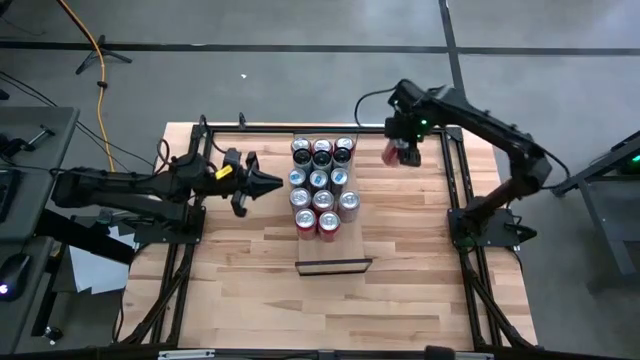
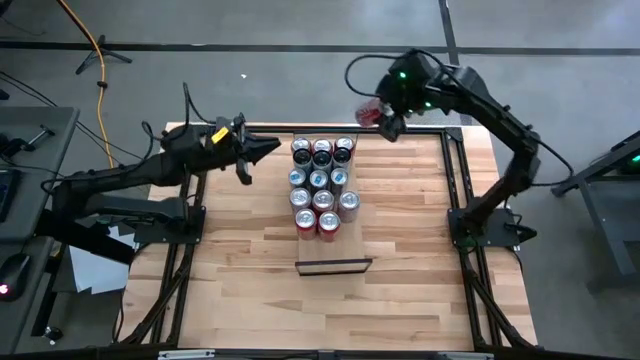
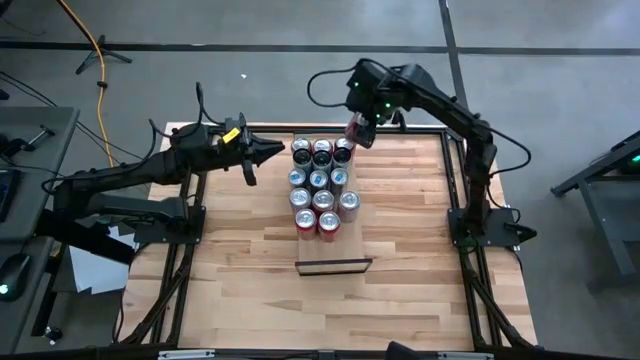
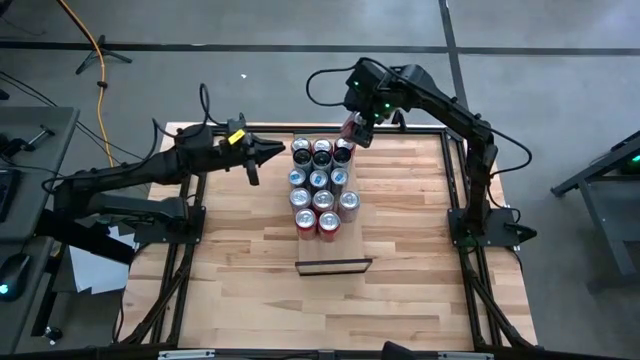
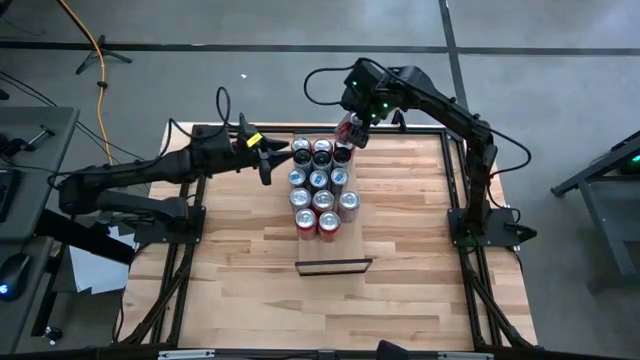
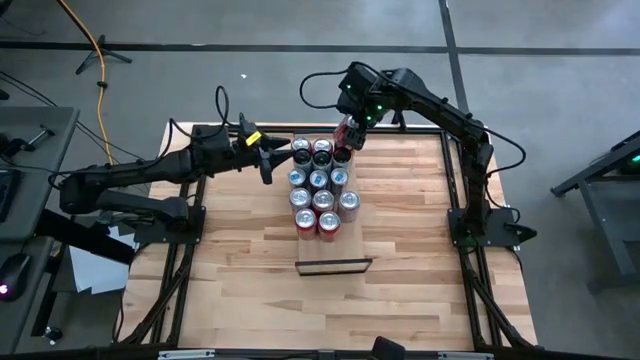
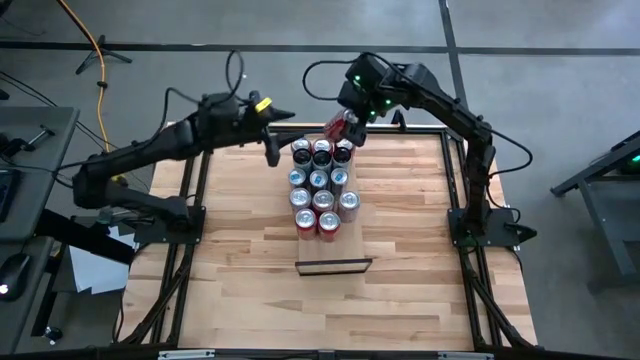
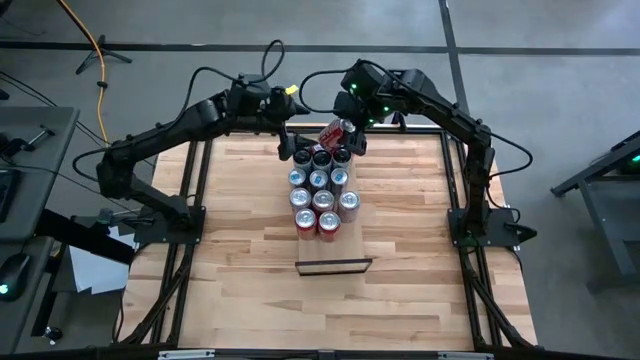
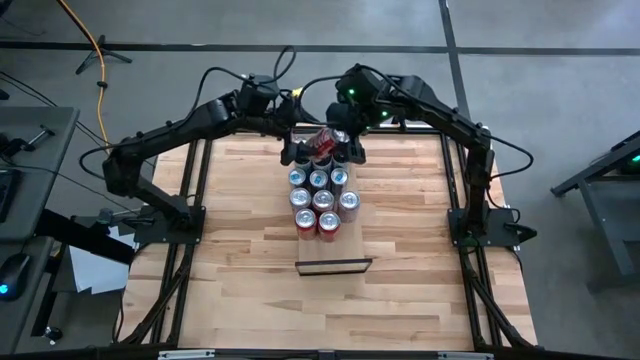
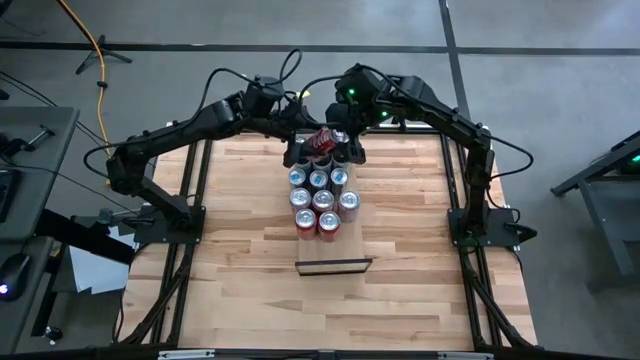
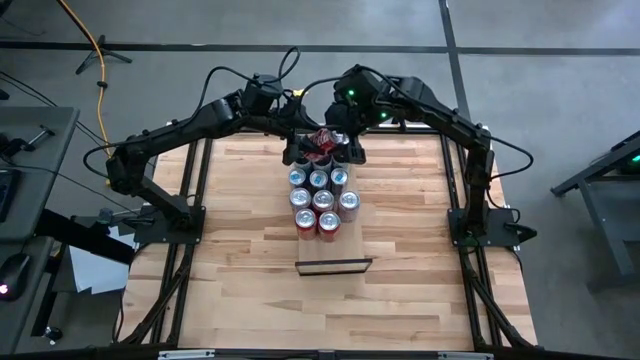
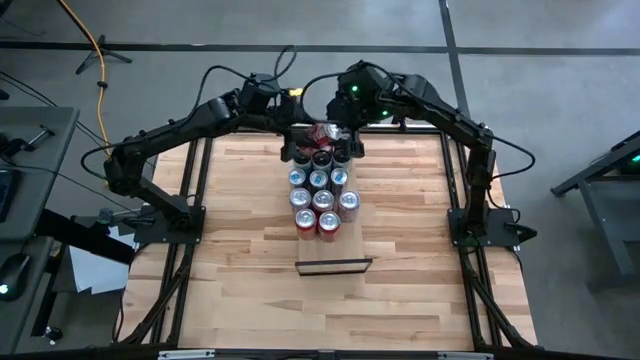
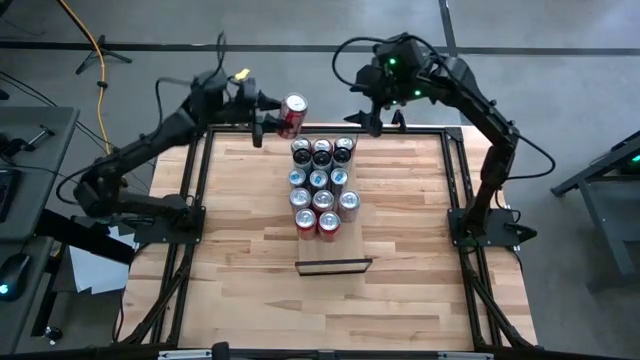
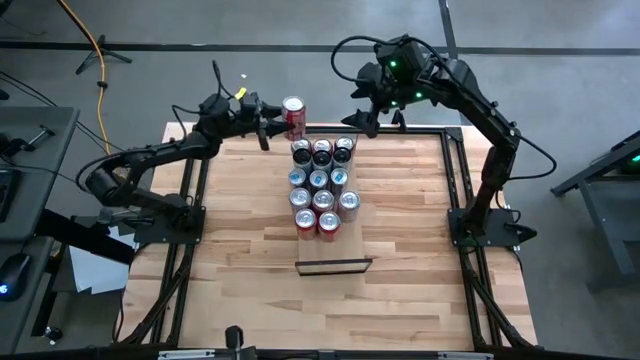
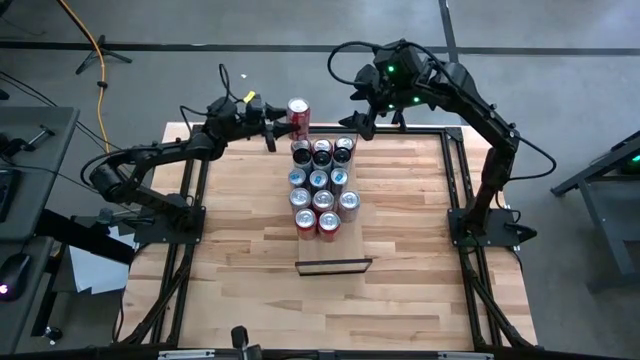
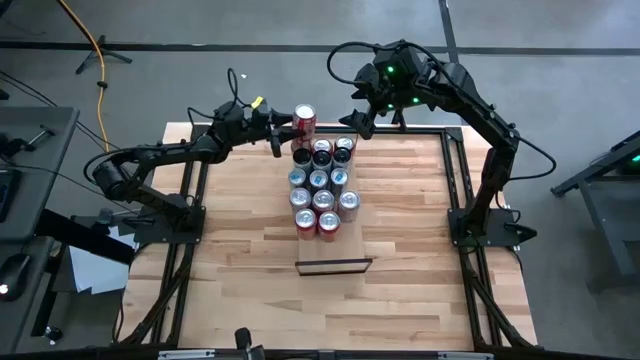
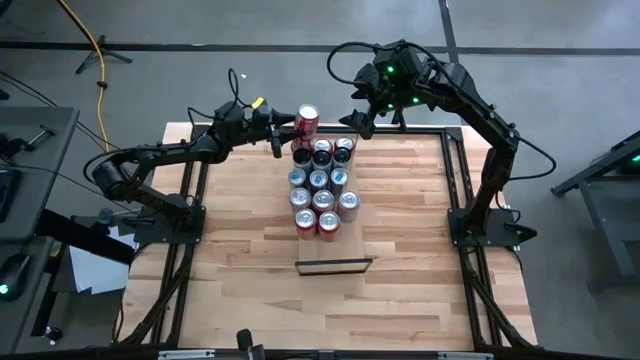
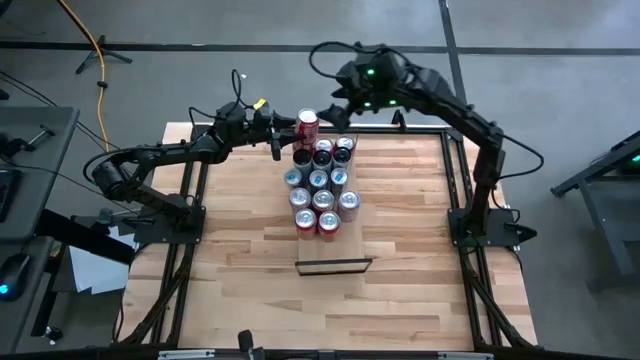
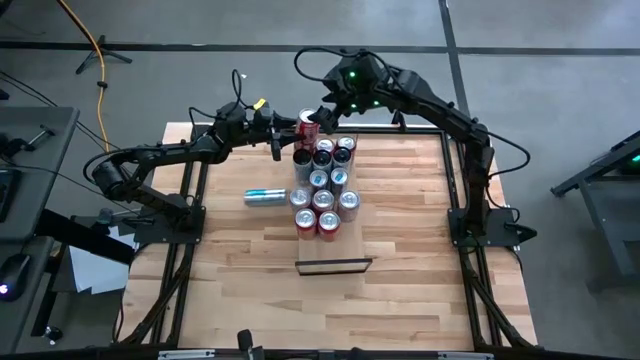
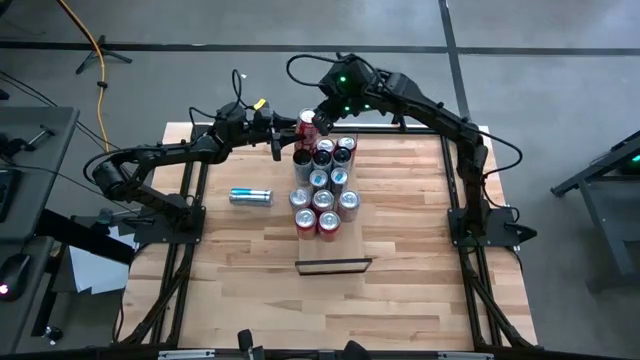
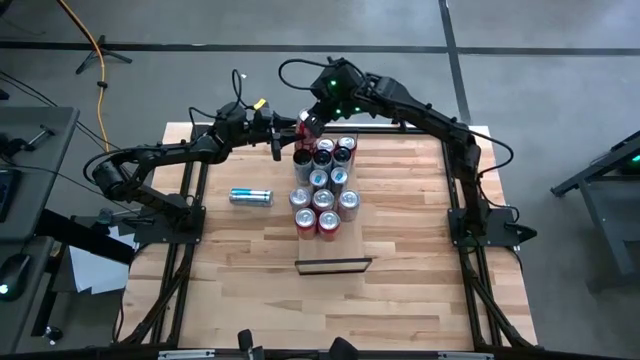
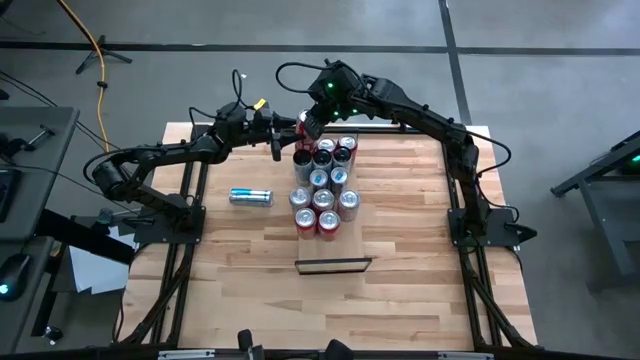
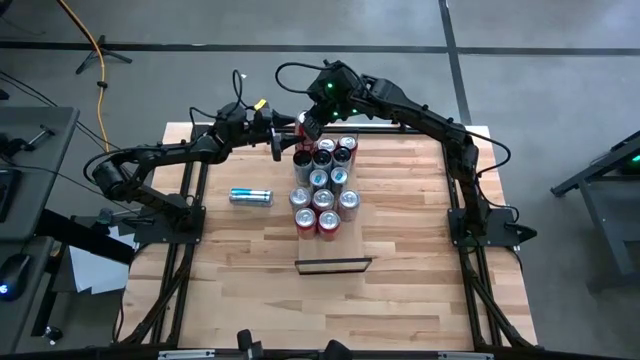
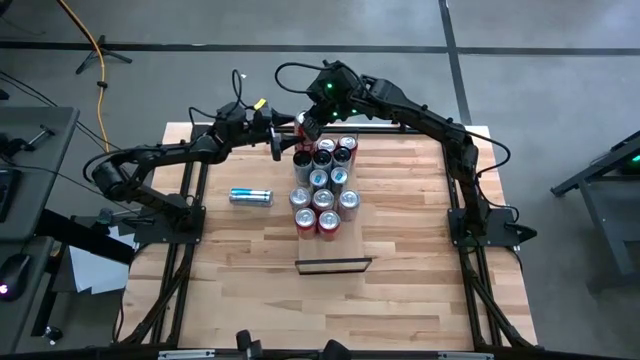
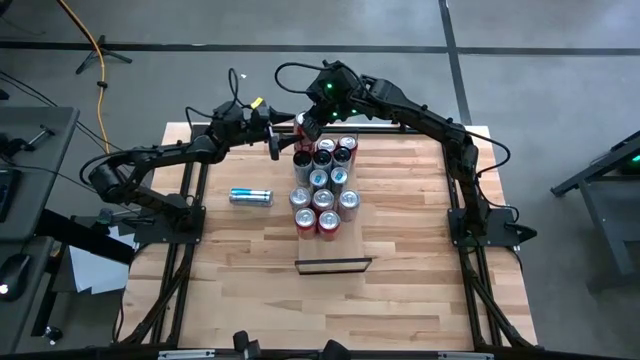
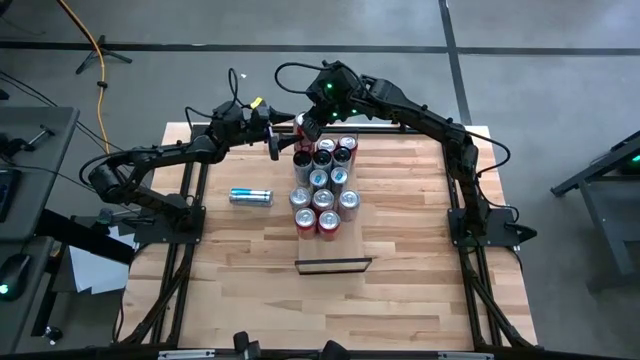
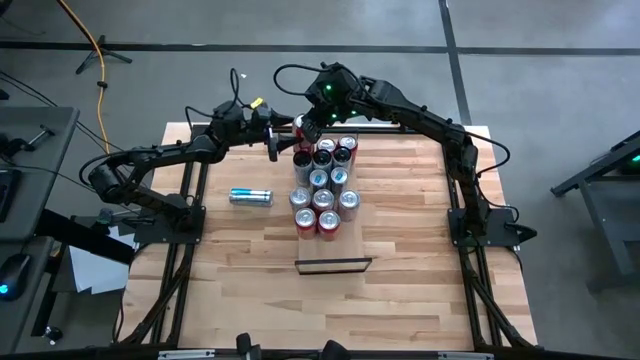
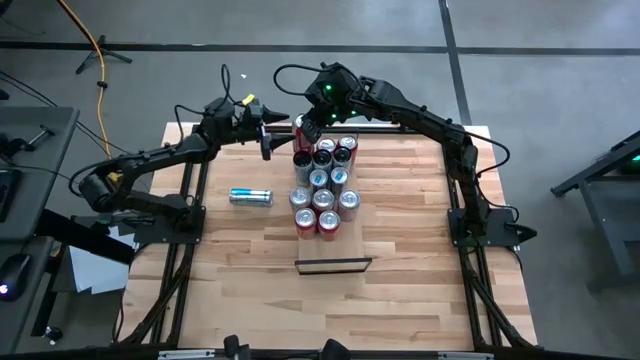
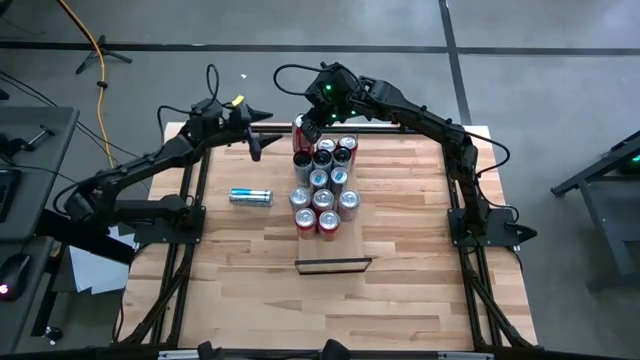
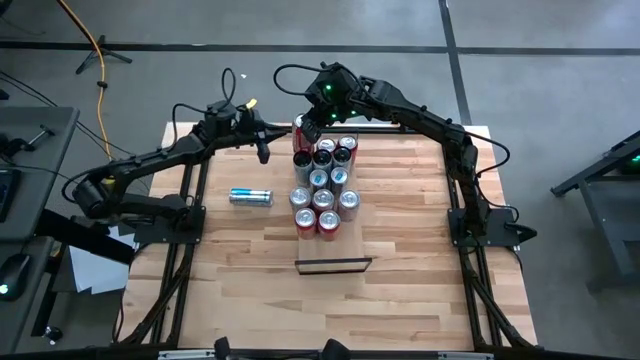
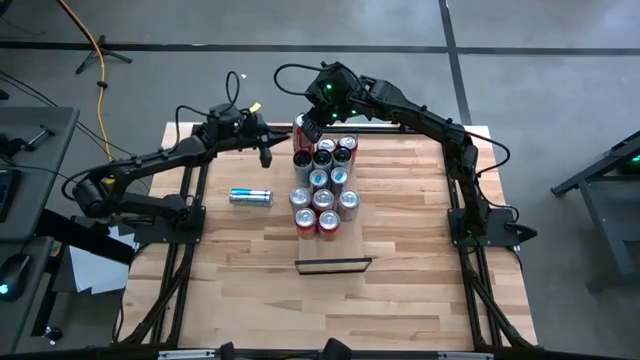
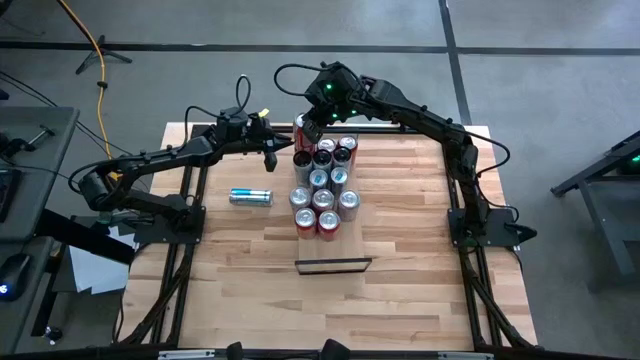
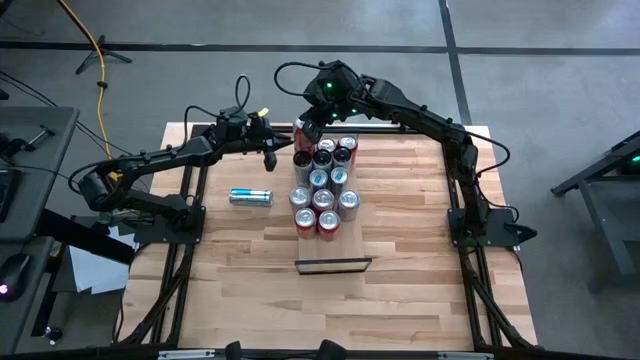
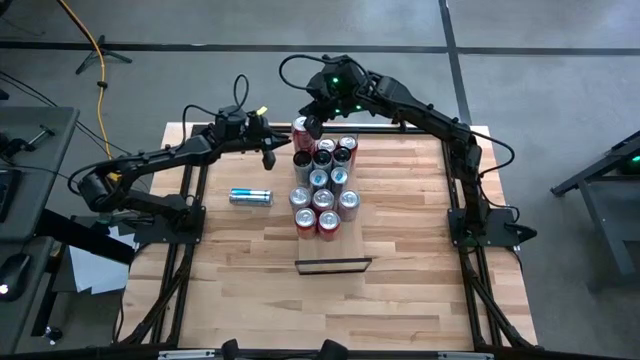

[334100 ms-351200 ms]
Task: Place canned beverage on shelf
Stack the red soda can on the top of the red soda can

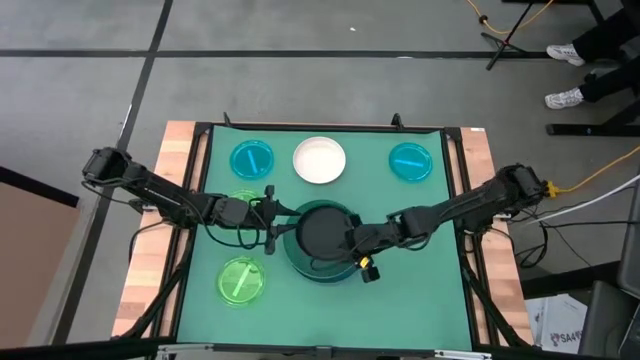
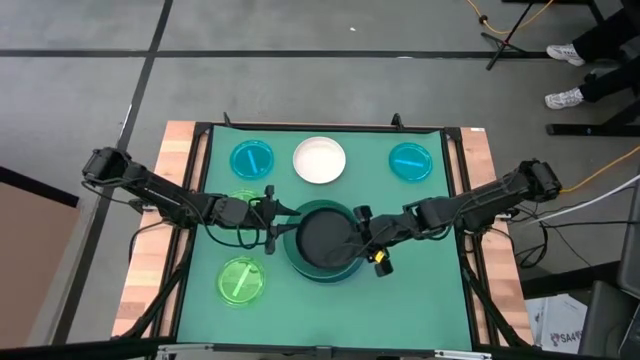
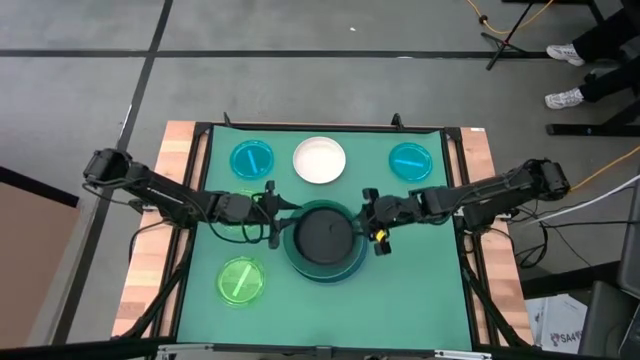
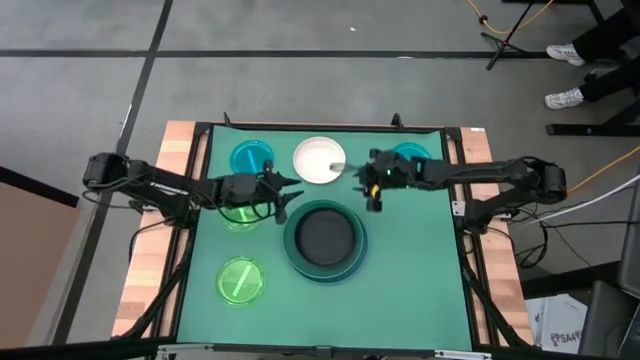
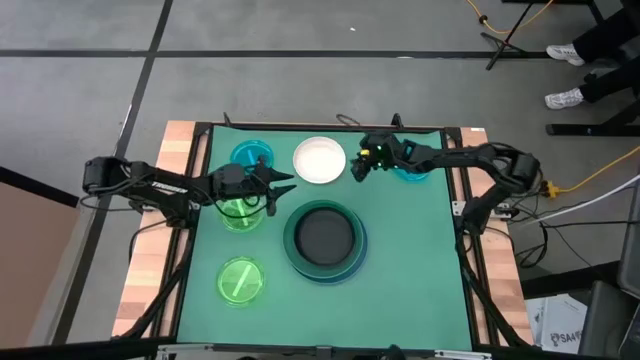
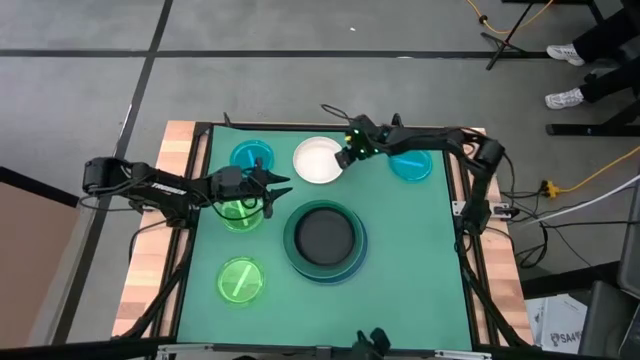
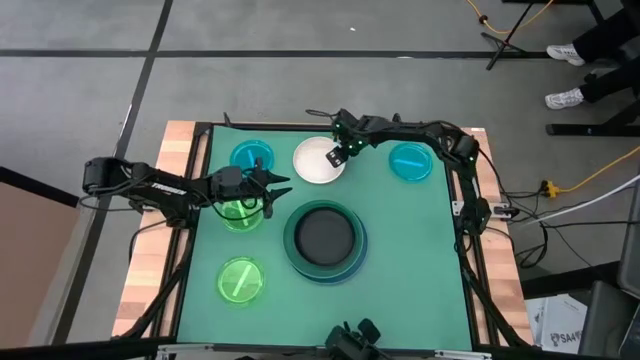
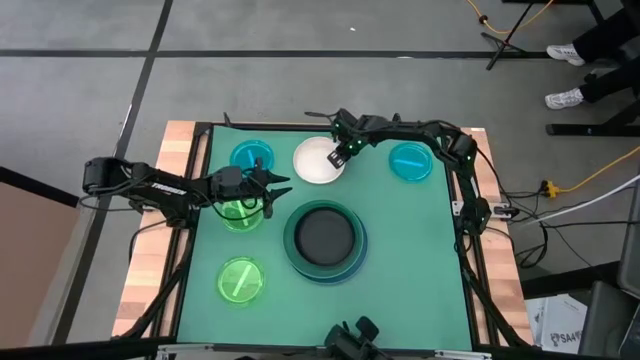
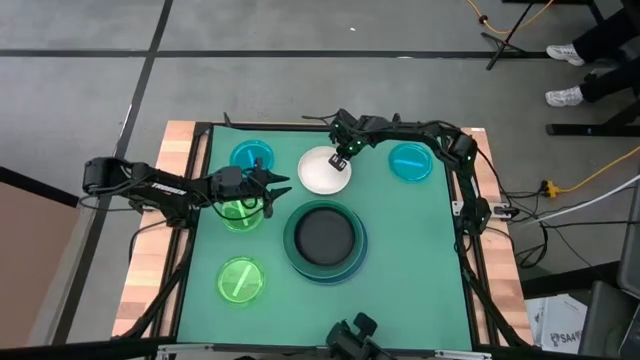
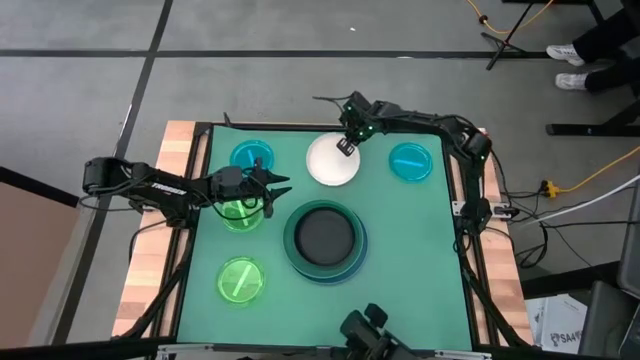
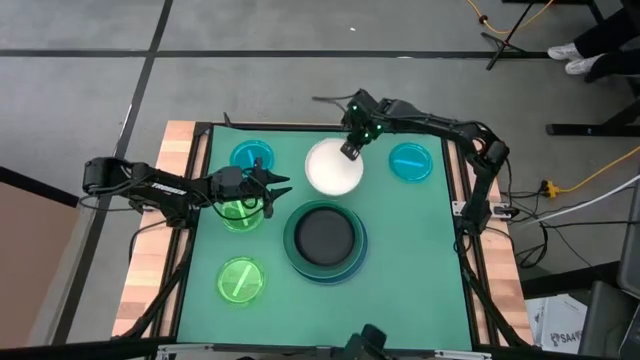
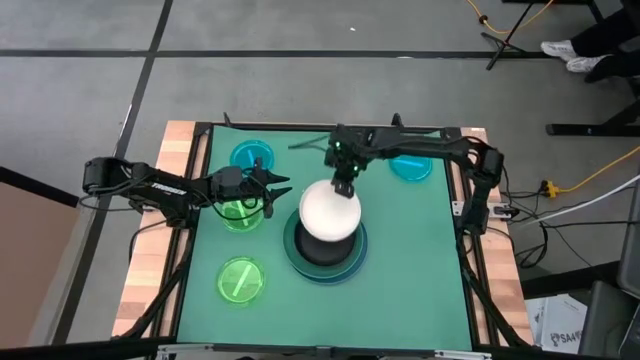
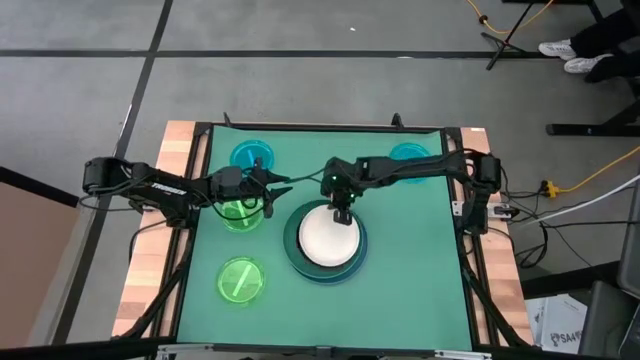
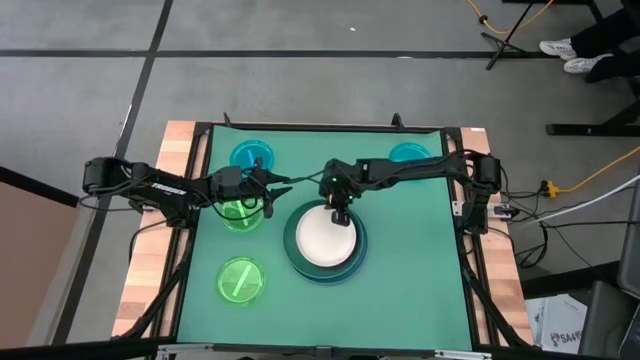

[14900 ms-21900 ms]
Task: Stack plastic plates
Stack the white plate on top of the black plate
